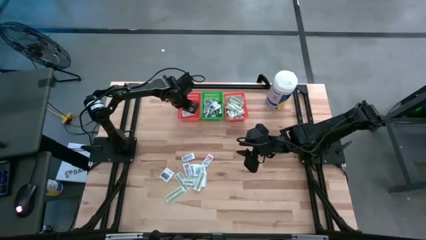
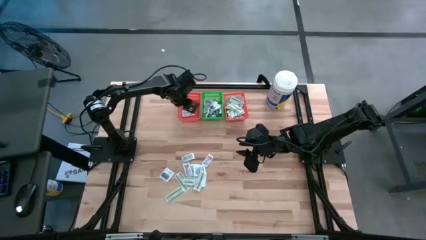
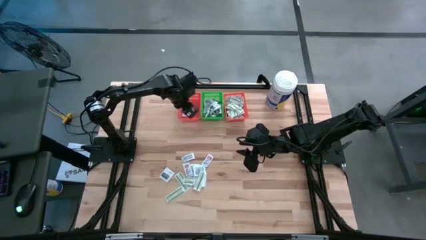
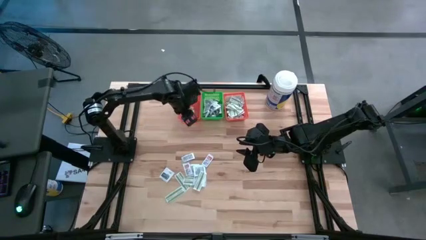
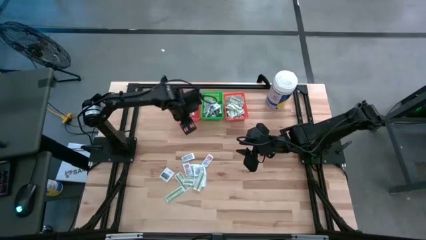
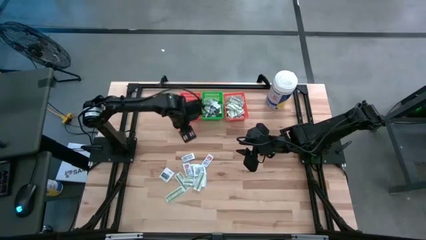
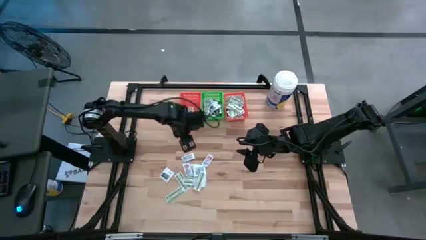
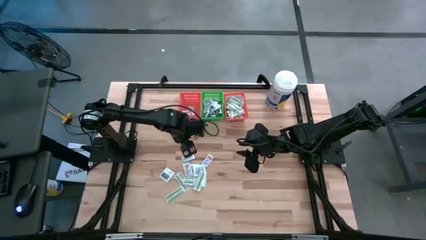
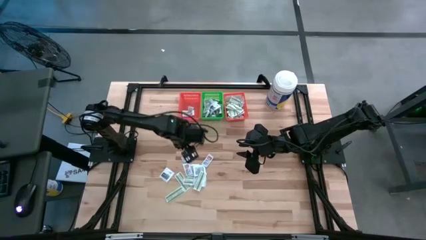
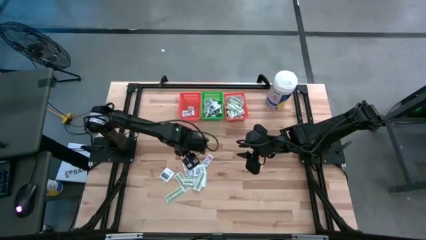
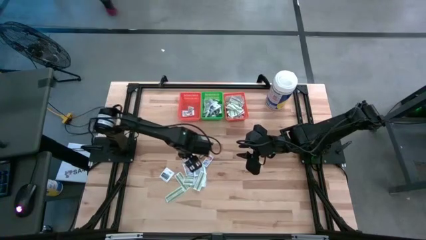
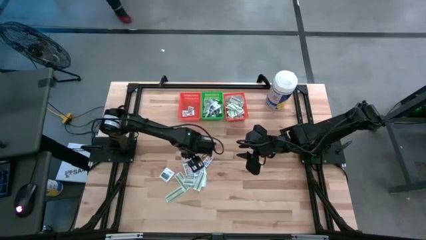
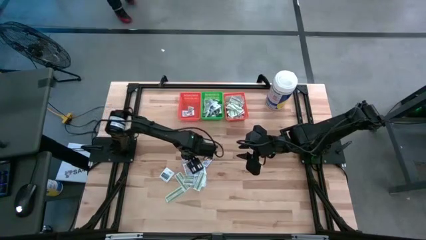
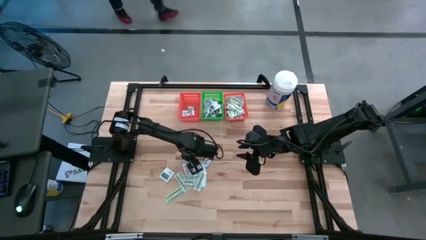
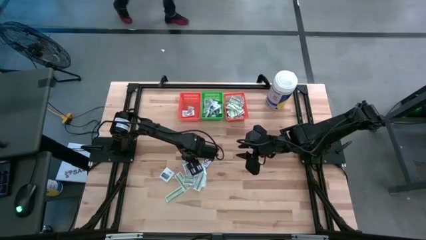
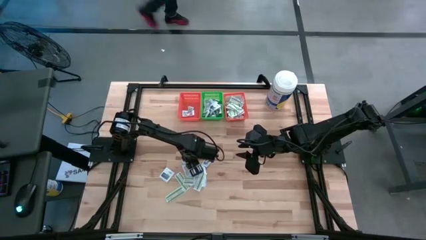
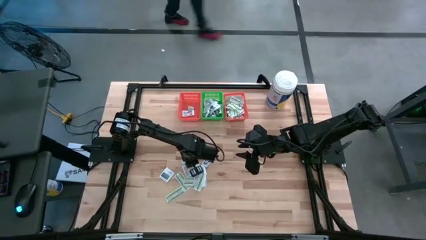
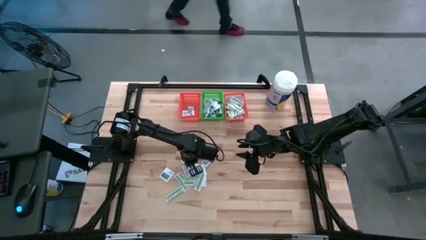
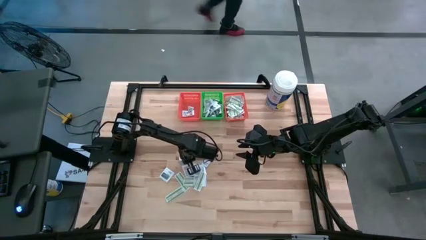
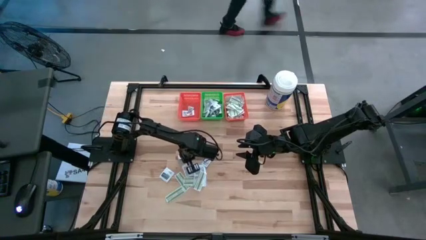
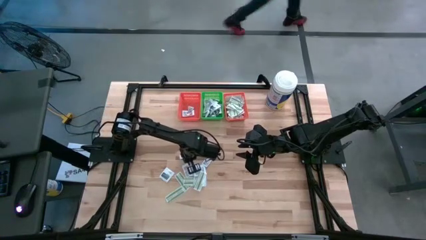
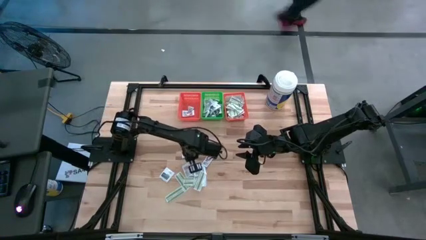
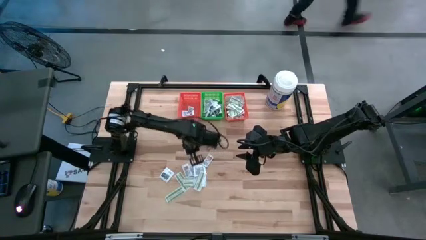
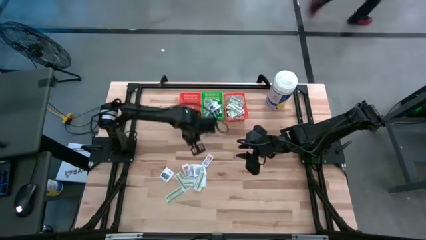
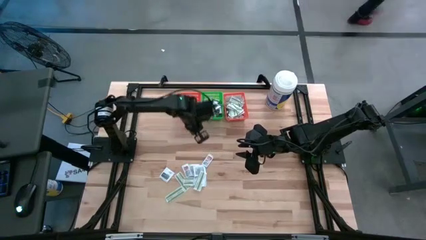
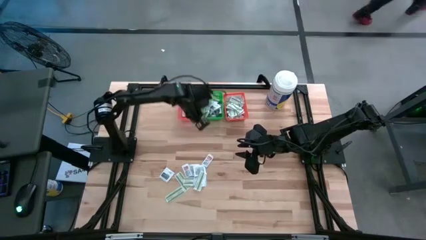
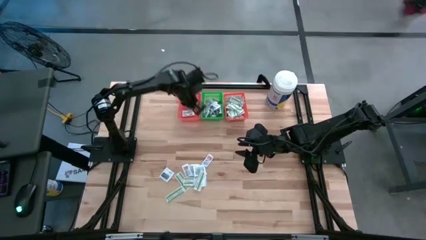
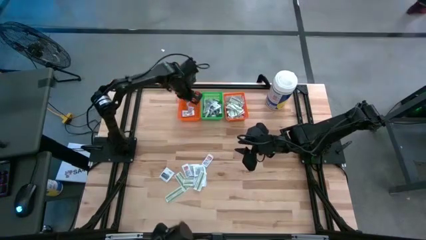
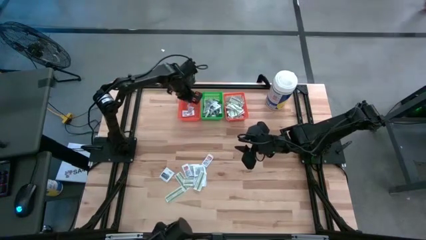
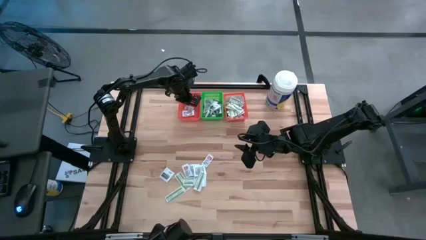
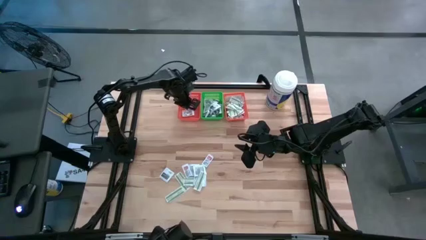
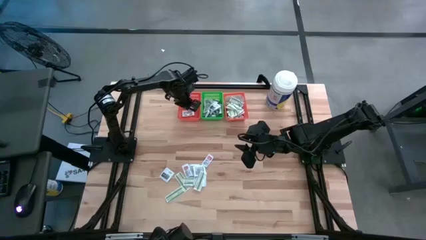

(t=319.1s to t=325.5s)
Task: Pick & Place First Aid Supplies
Put the top ointment pack into the left orange bin

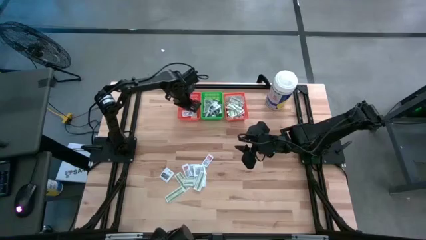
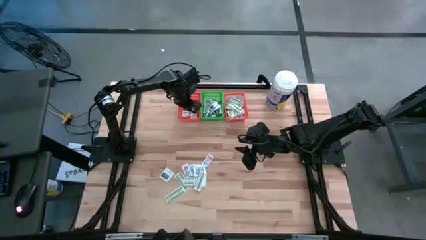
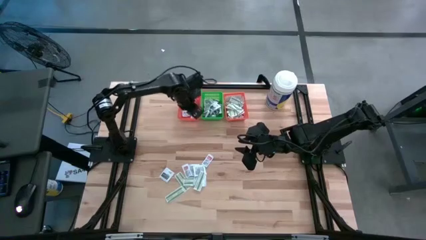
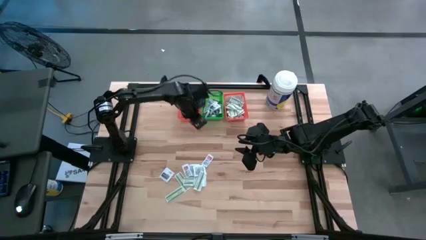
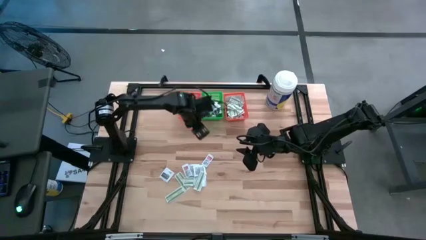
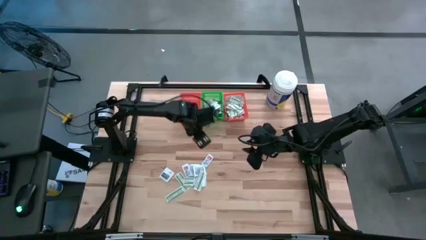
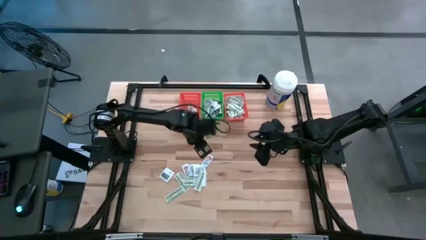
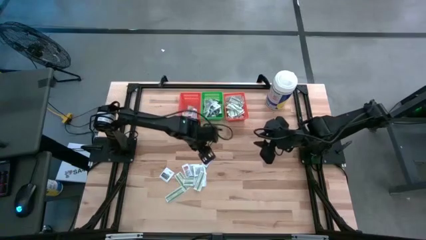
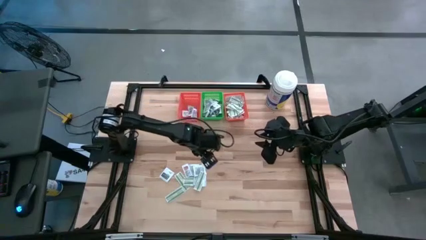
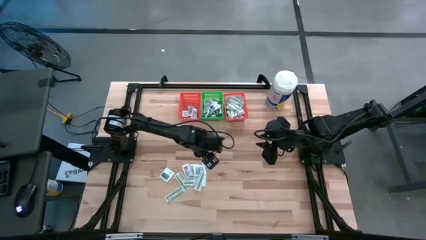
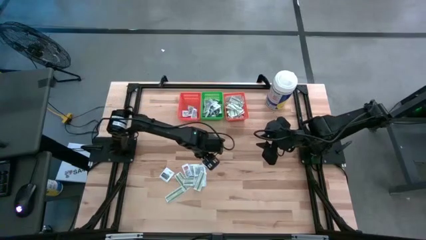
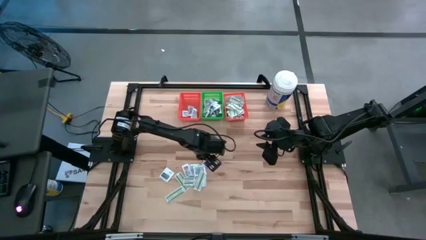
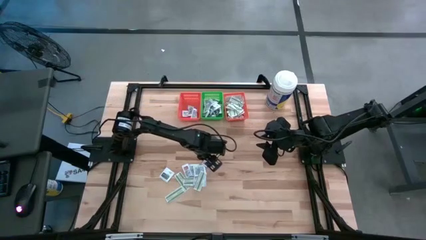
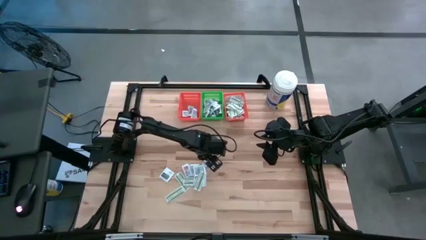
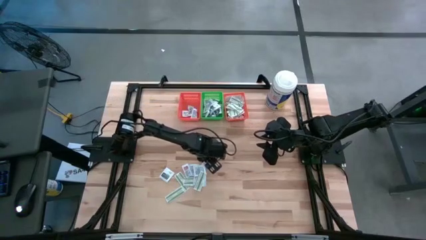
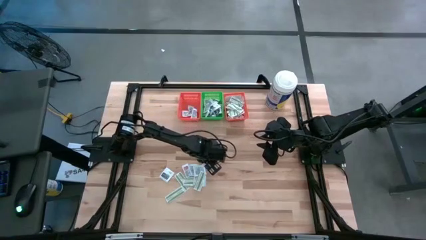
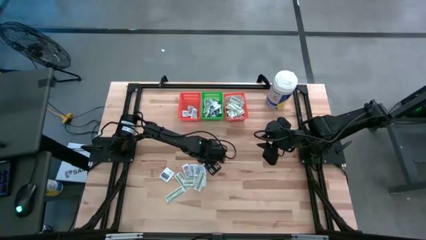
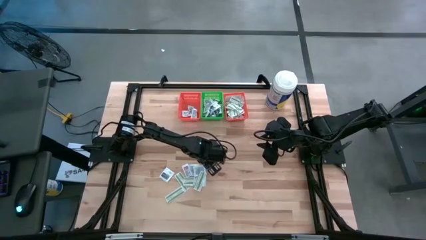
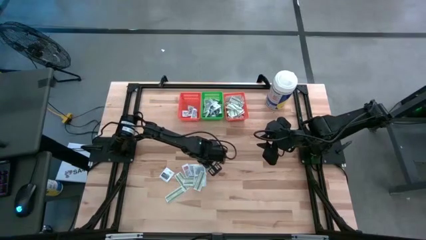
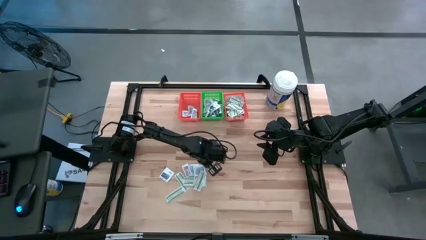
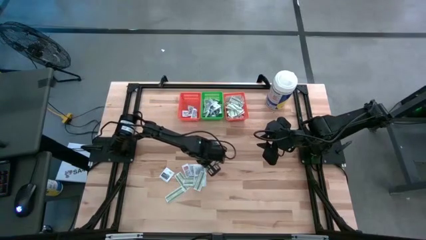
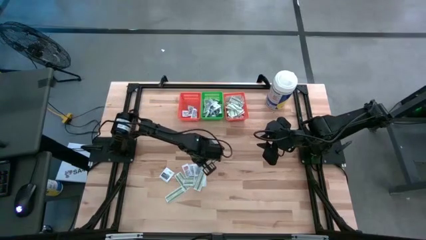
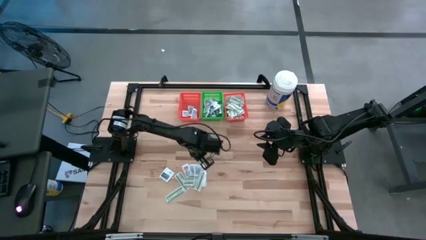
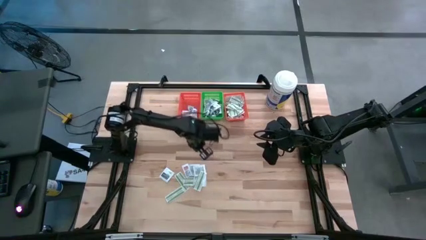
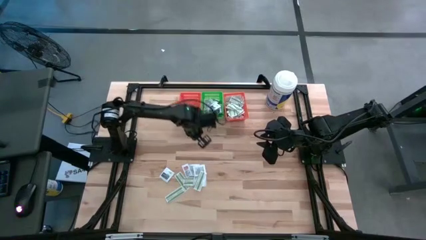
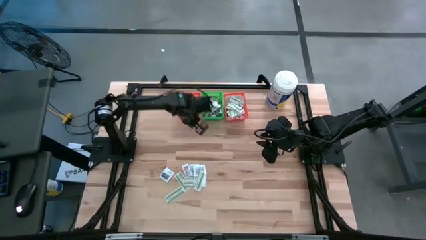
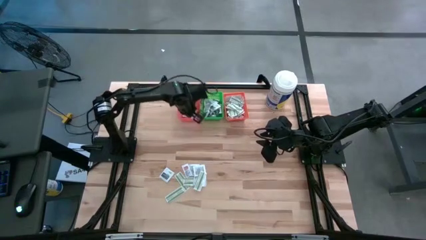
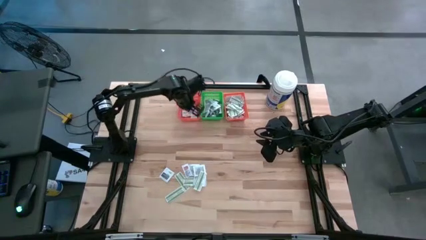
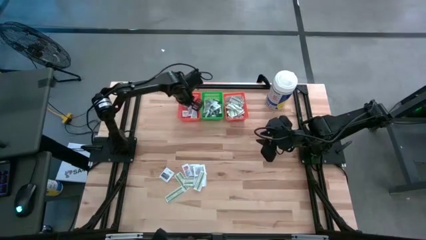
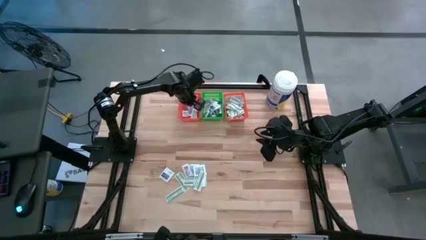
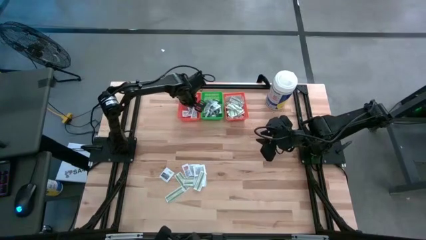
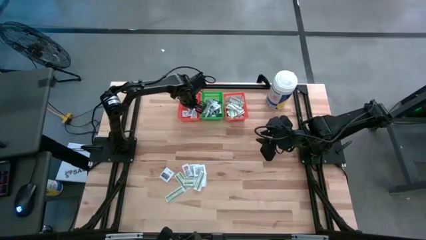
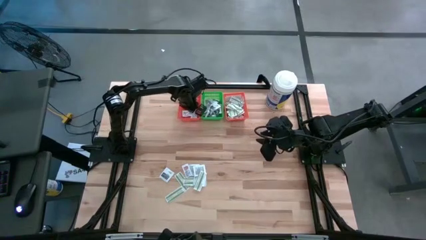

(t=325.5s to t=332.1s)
Put the right ointment pack into the left orange bin
